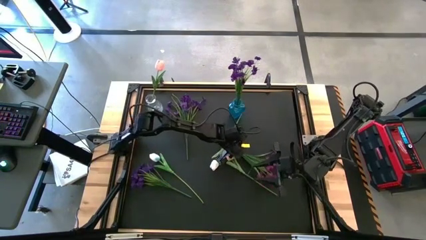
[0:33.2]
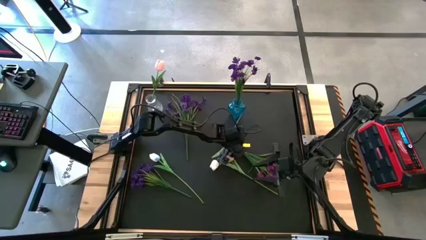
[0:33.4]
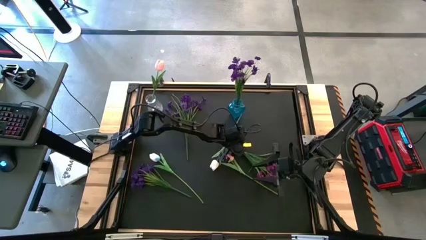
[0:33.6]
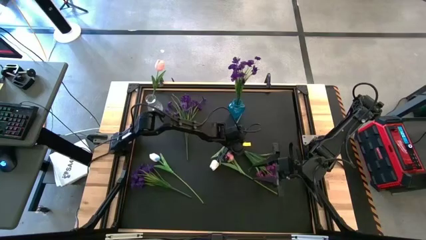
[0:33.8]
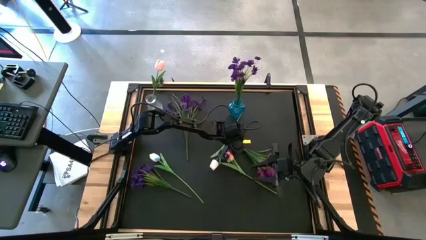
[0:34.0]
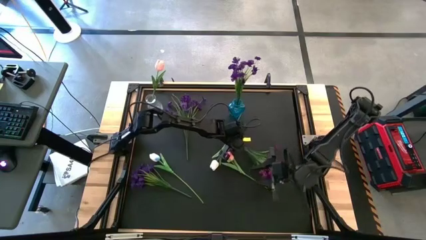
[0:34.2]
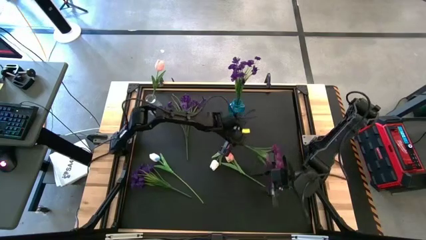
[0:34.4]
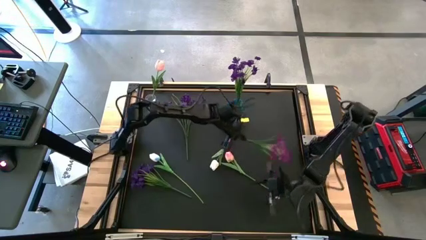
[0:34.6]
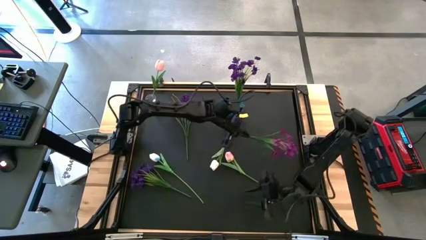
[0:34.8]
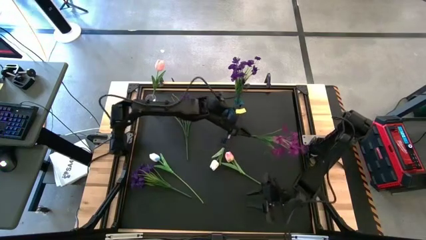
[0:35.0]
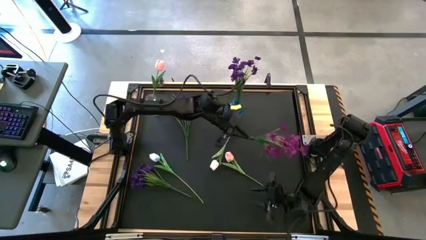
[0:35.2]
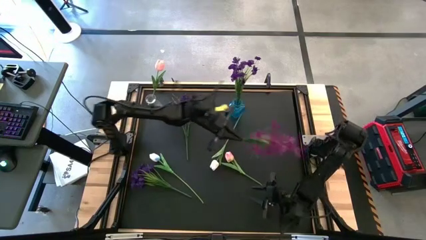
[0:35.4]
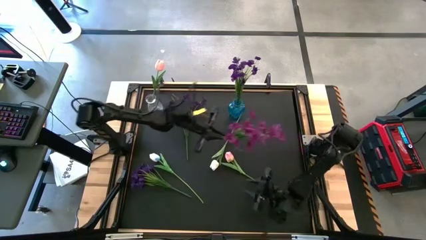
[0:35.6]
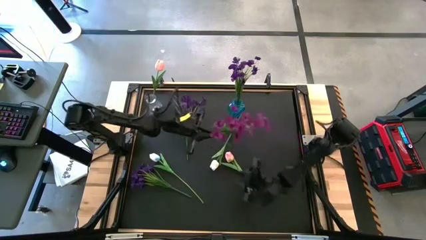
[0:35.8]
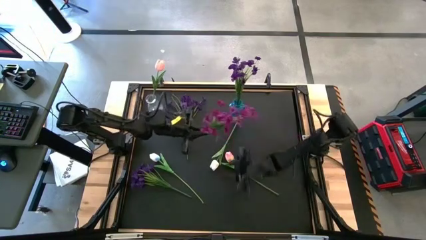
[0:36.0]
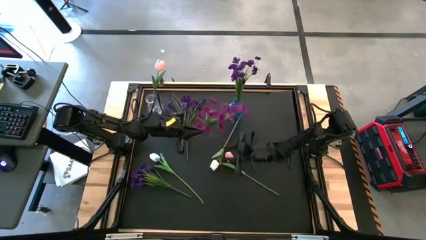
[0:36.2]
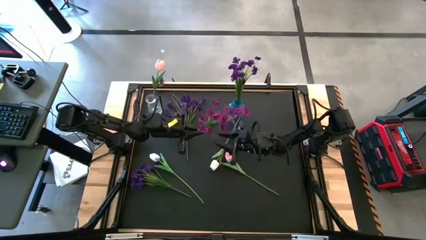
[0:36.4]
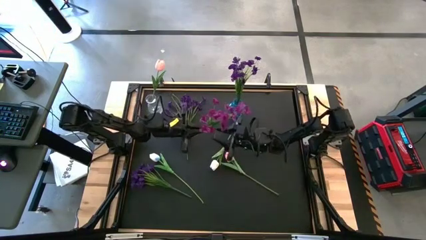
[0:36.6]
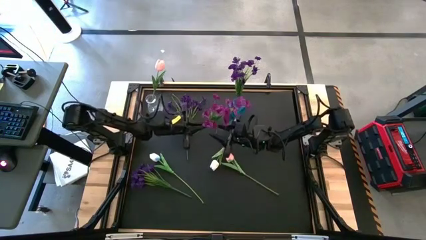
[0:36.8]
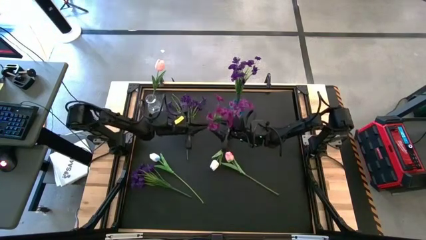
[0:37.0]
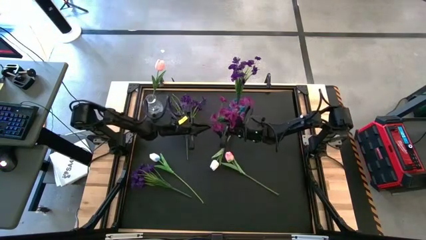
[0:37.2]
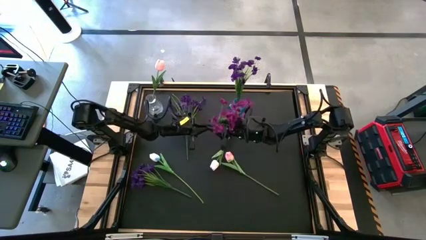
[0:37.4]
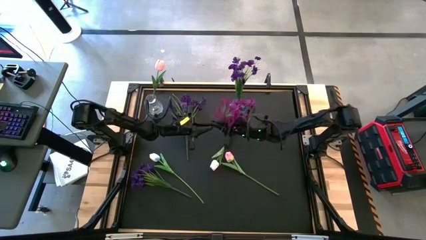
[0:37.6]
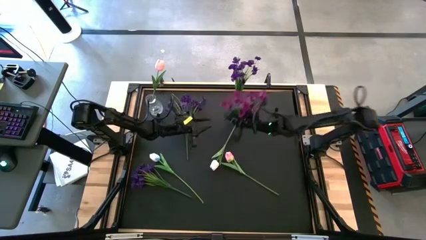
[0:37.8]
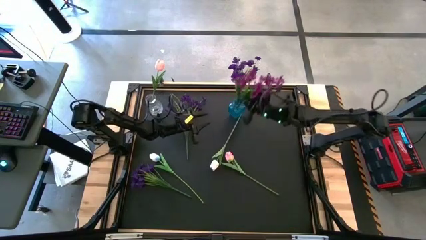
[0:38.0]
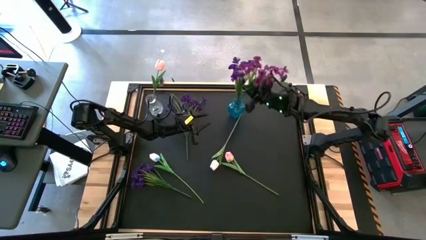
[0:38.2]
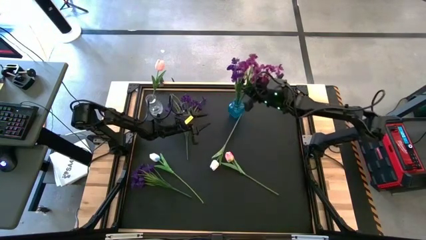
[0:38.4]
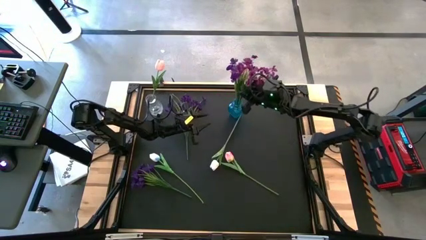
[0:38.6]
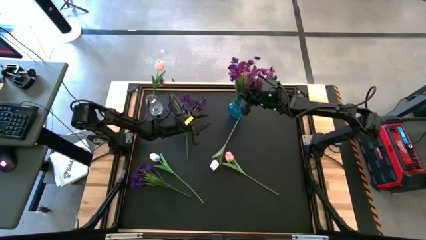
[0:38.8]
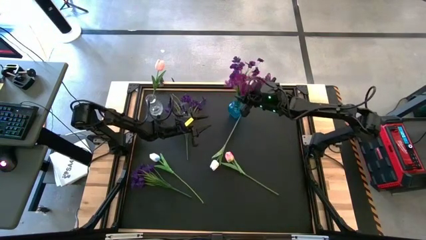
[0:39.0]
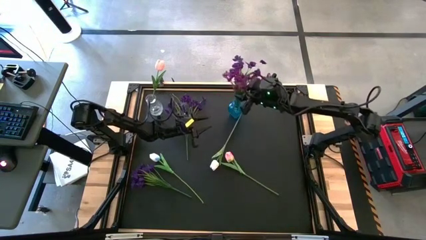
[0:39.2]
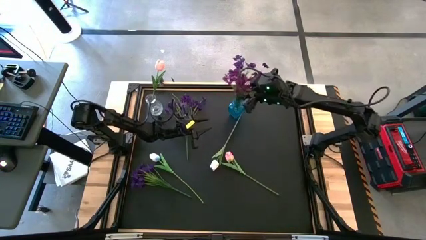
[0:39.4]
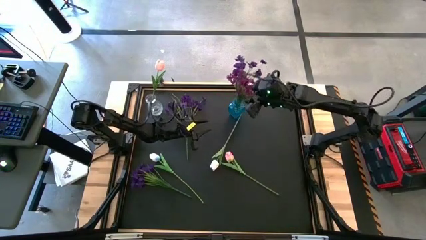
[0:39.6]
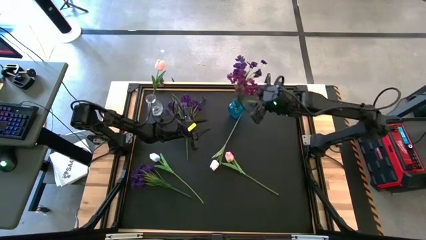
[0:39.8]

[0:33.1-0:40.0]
Task: Sort flowers into vase by color
Put the pink flower into the blue vase

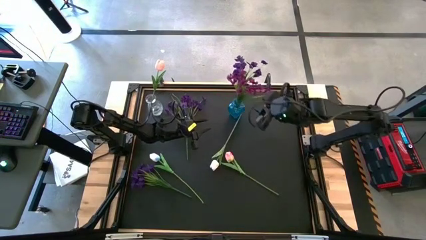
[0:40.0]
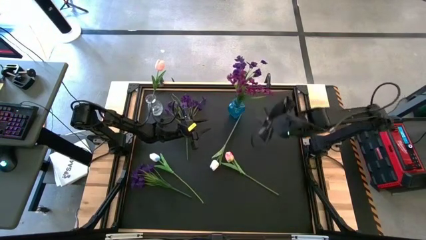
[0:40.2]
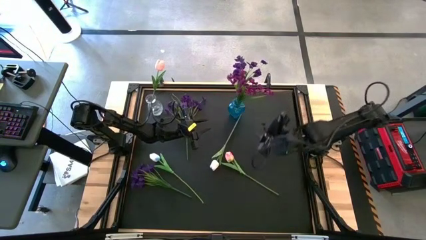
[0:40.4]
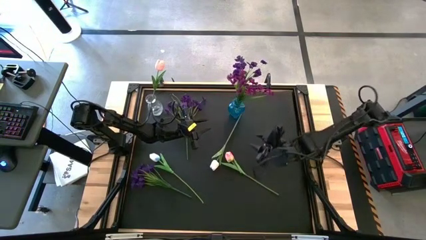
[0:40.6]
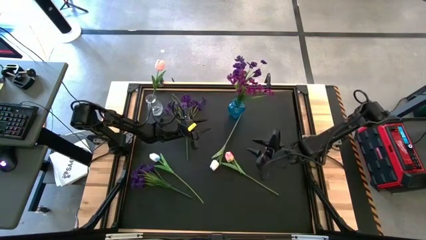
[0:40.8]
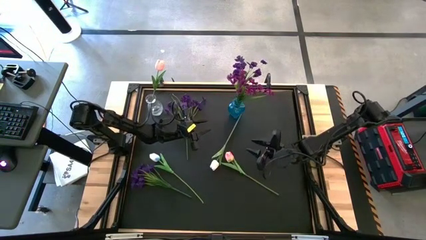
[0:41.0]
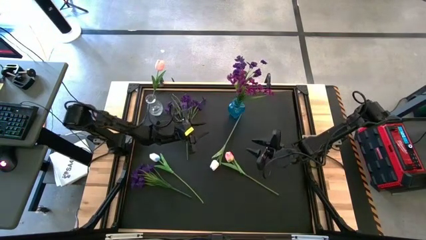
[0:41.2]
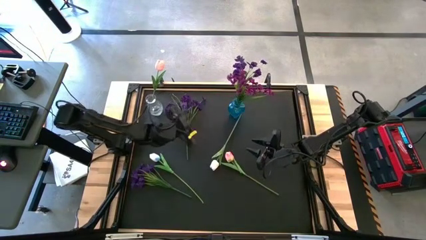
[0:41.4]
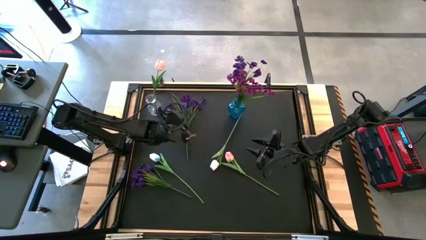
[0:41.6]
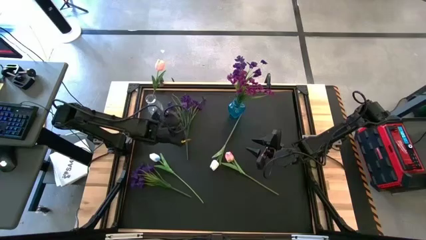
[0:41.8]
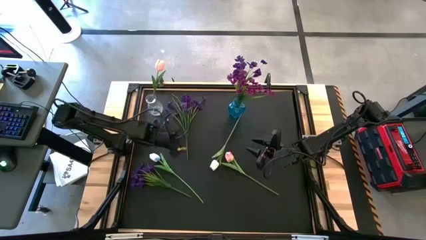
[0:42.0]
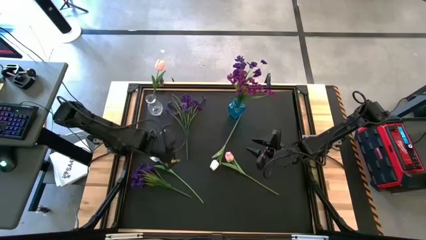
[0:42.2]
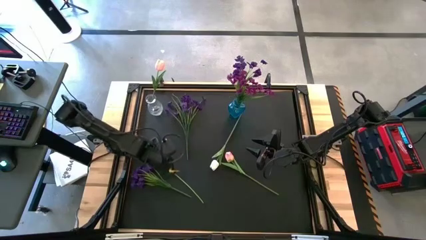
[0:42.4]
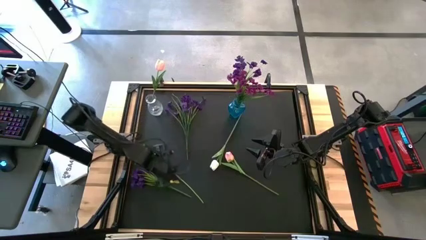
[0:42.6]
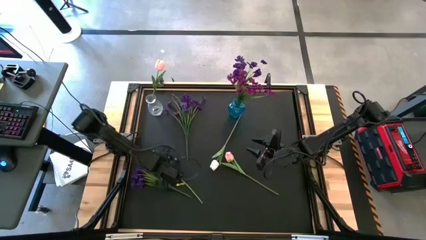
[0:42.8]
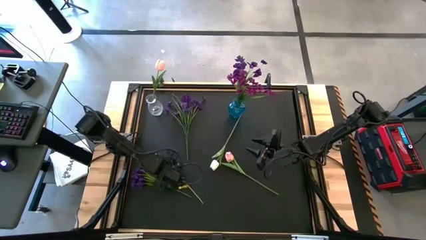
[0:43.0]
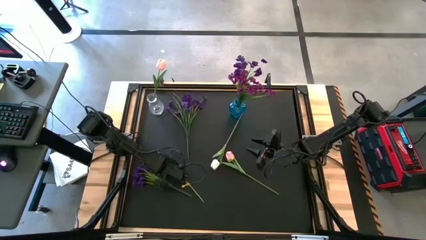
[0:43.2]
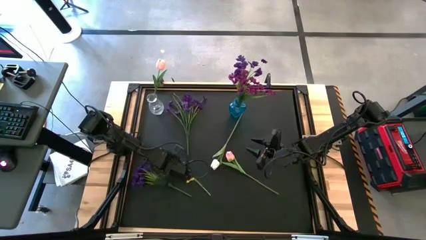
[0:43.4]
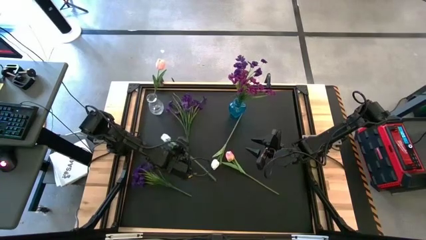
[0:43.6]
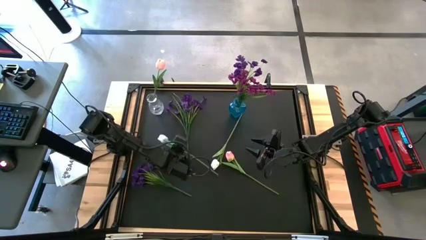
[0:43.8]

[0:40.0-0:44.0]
Put the left white tulip into the transparent vase
